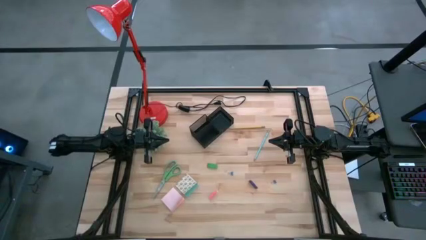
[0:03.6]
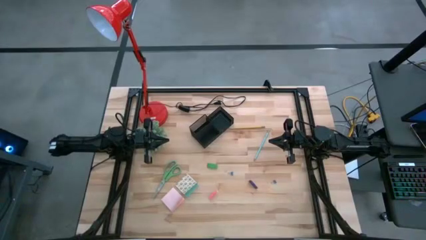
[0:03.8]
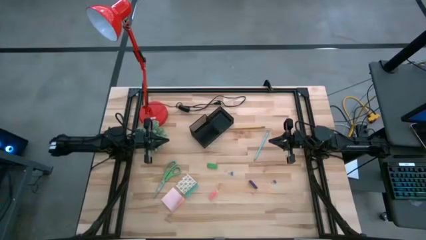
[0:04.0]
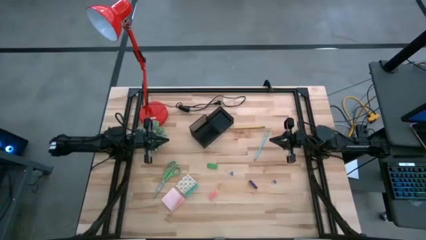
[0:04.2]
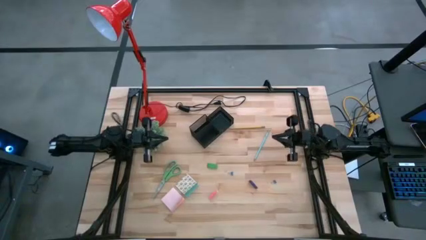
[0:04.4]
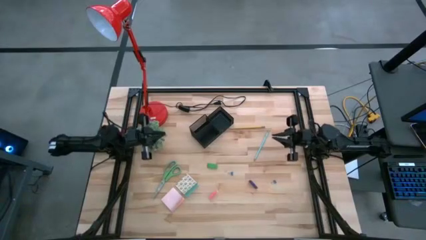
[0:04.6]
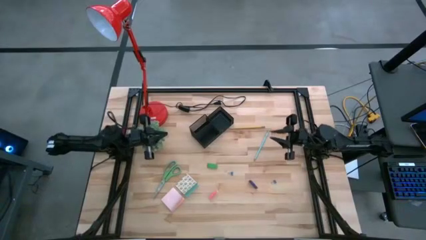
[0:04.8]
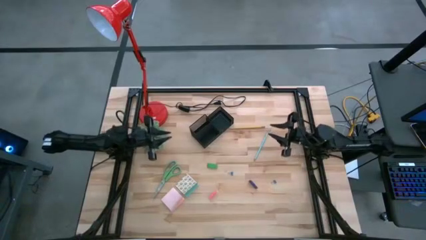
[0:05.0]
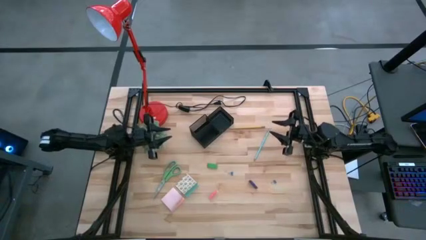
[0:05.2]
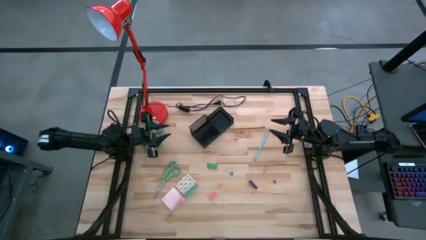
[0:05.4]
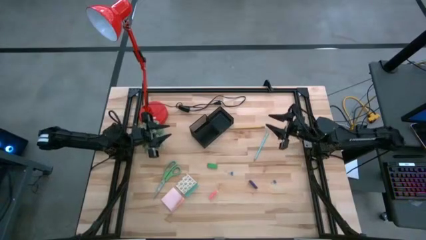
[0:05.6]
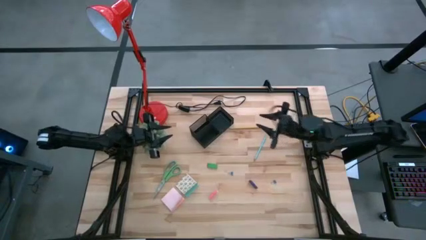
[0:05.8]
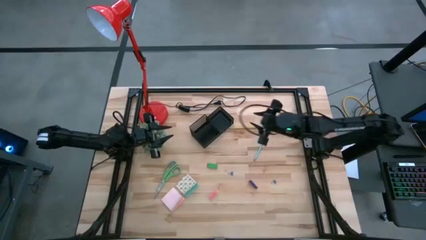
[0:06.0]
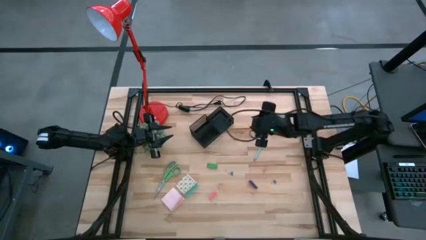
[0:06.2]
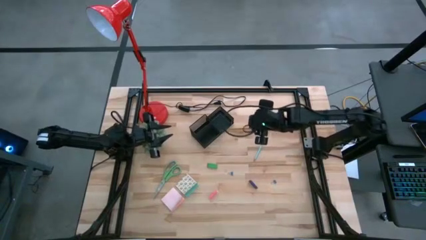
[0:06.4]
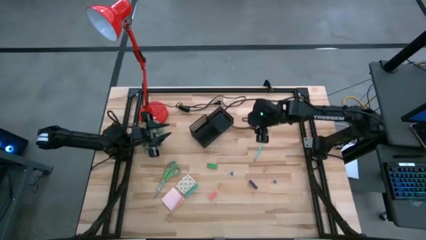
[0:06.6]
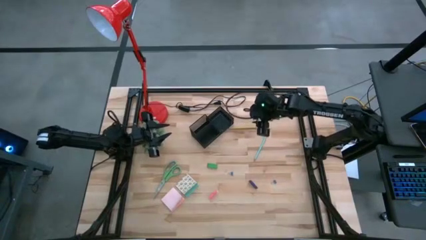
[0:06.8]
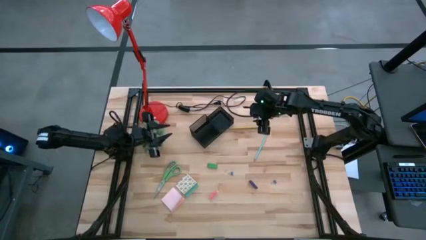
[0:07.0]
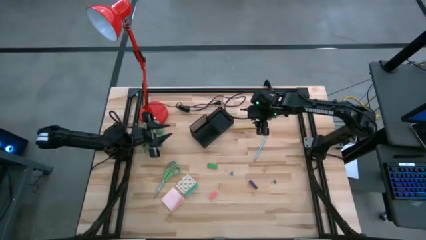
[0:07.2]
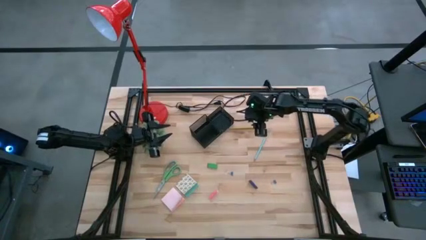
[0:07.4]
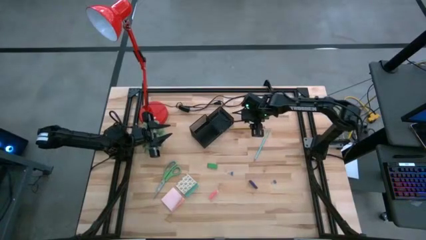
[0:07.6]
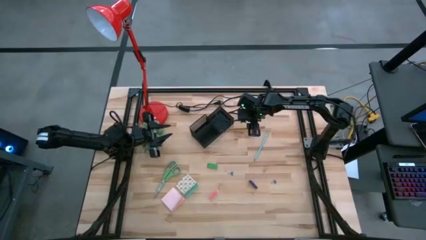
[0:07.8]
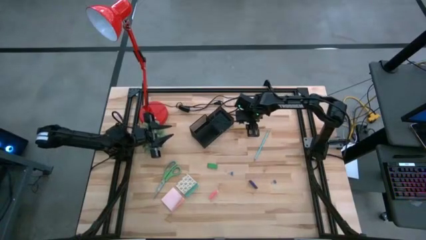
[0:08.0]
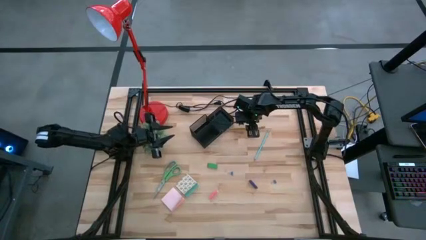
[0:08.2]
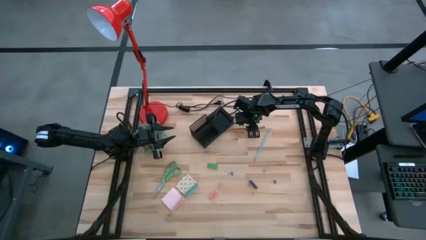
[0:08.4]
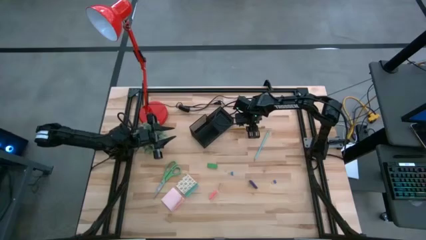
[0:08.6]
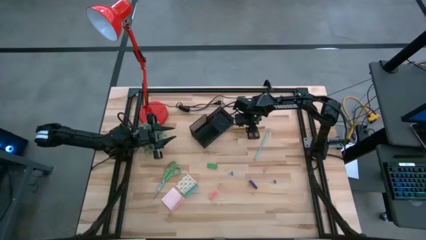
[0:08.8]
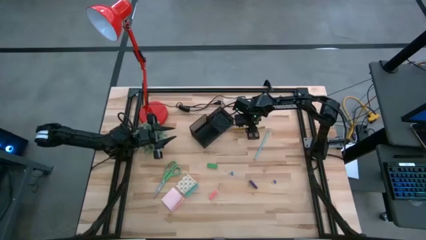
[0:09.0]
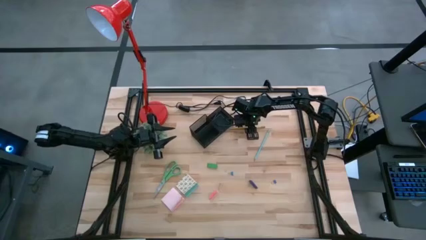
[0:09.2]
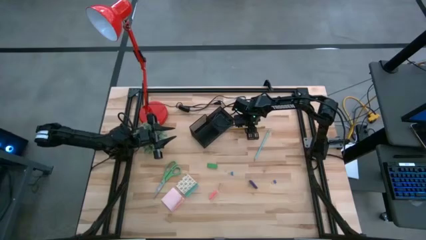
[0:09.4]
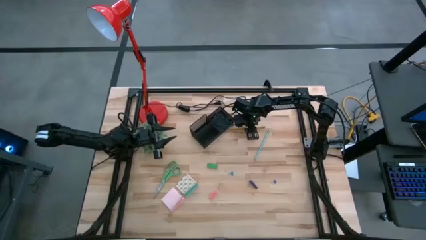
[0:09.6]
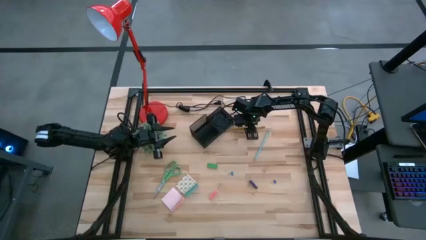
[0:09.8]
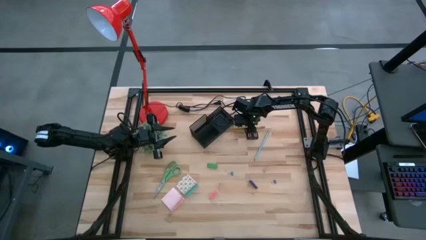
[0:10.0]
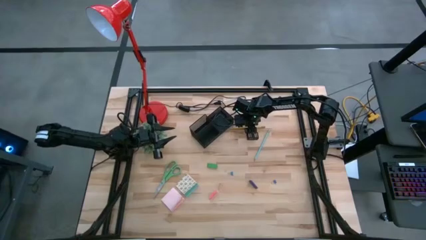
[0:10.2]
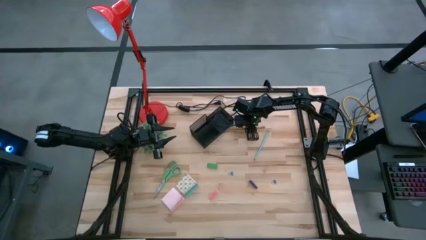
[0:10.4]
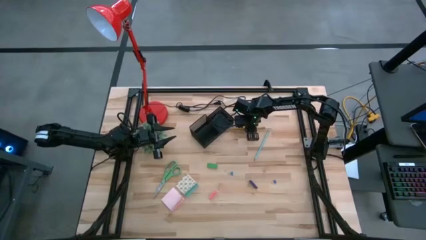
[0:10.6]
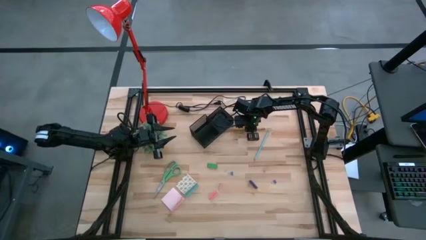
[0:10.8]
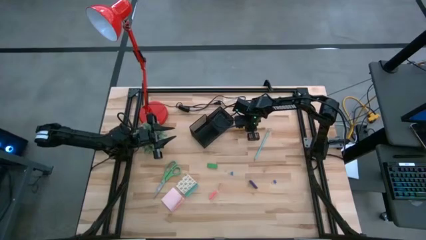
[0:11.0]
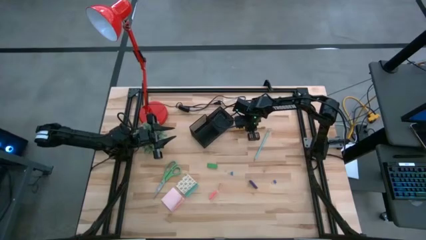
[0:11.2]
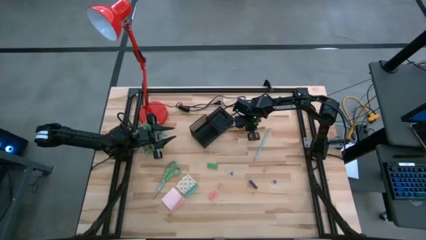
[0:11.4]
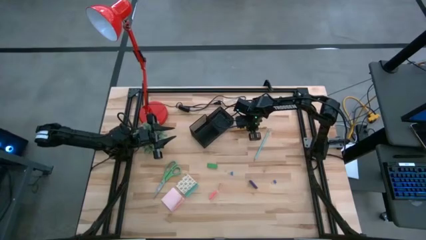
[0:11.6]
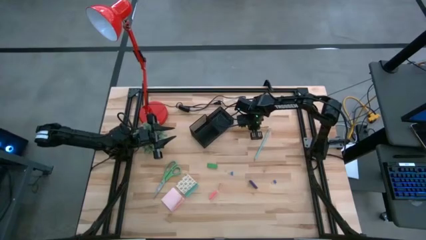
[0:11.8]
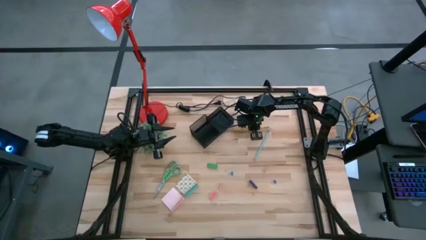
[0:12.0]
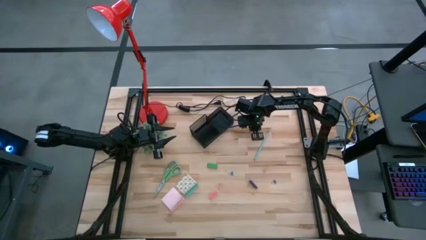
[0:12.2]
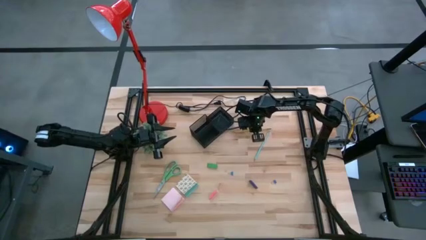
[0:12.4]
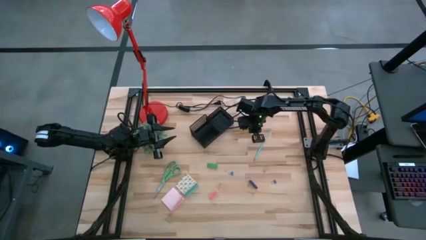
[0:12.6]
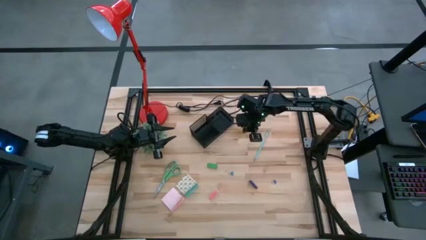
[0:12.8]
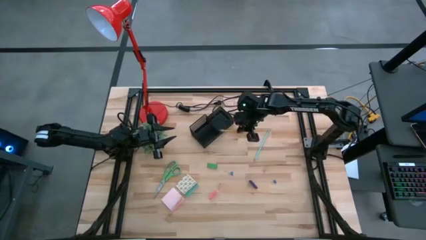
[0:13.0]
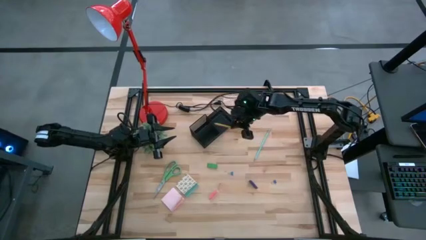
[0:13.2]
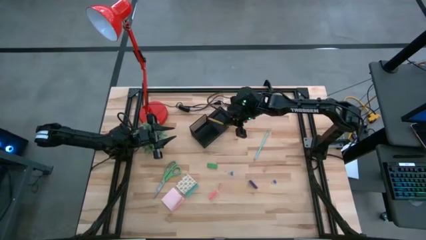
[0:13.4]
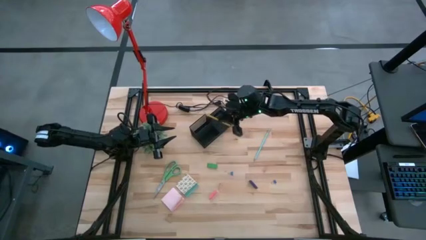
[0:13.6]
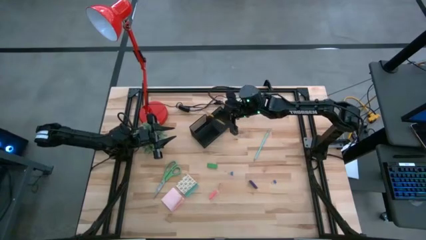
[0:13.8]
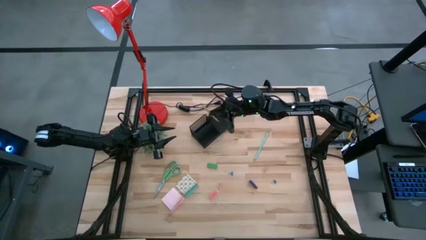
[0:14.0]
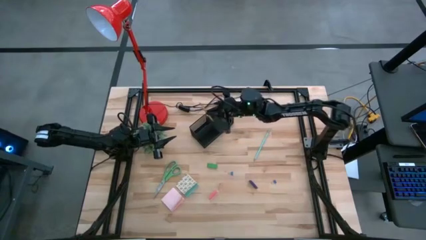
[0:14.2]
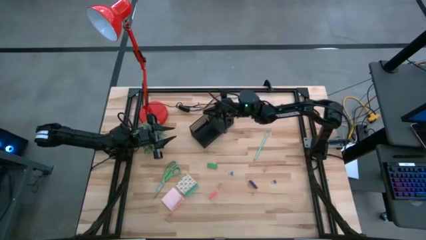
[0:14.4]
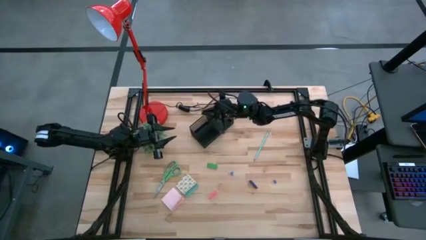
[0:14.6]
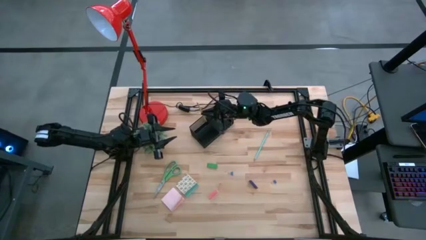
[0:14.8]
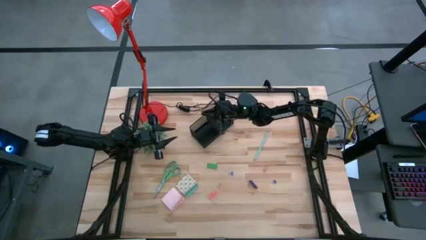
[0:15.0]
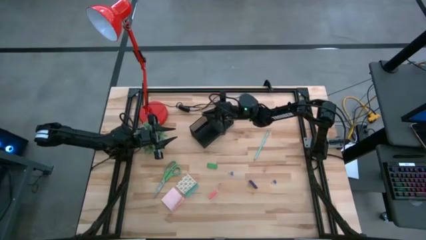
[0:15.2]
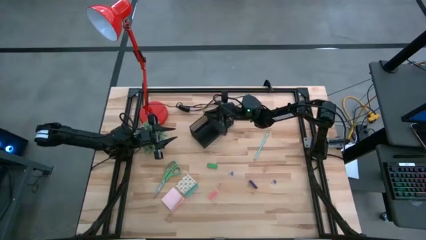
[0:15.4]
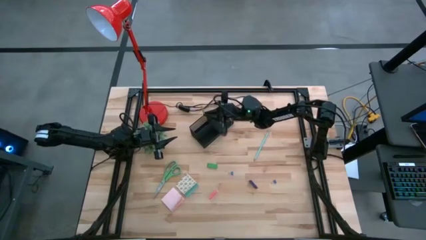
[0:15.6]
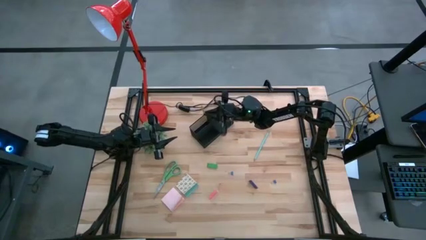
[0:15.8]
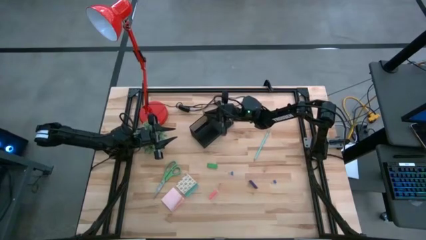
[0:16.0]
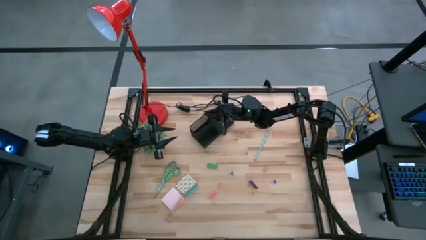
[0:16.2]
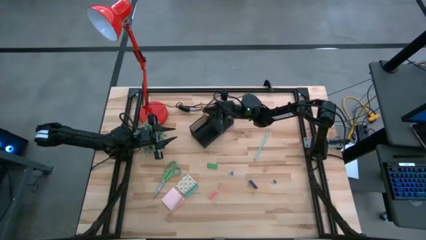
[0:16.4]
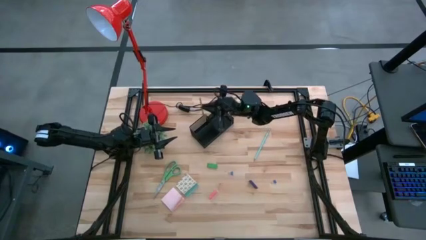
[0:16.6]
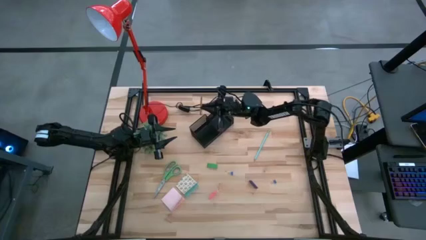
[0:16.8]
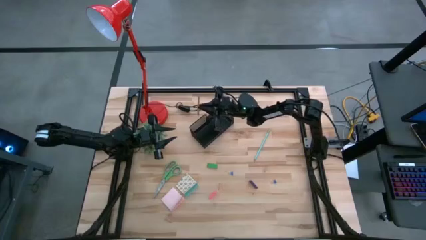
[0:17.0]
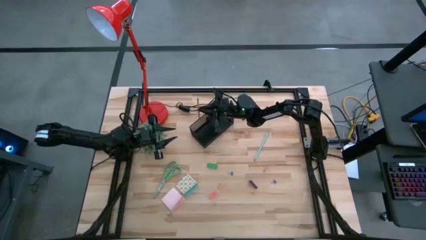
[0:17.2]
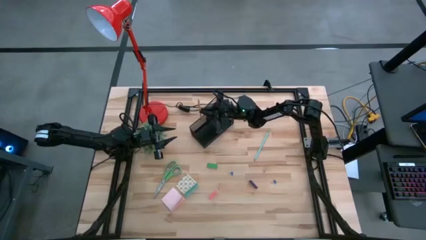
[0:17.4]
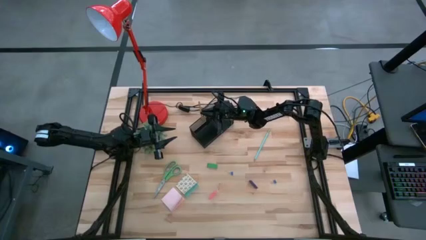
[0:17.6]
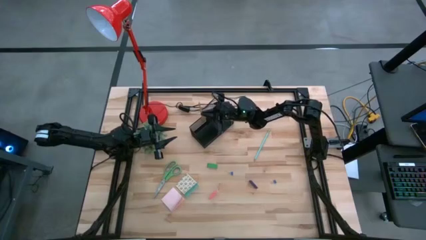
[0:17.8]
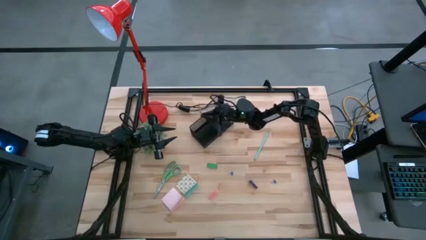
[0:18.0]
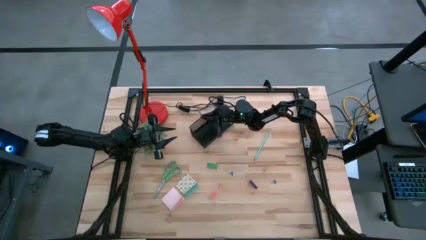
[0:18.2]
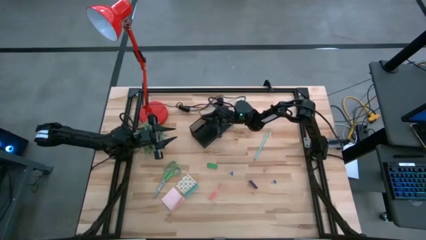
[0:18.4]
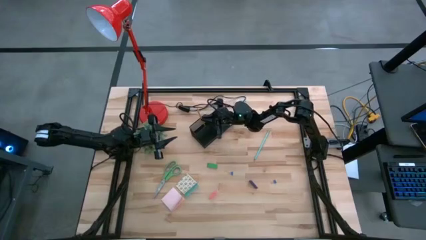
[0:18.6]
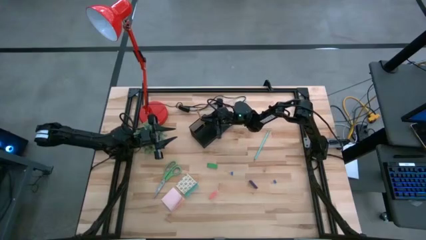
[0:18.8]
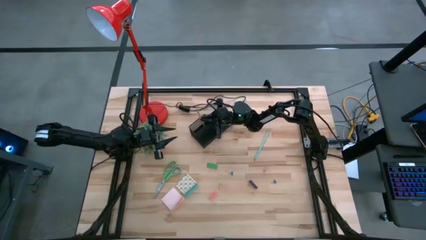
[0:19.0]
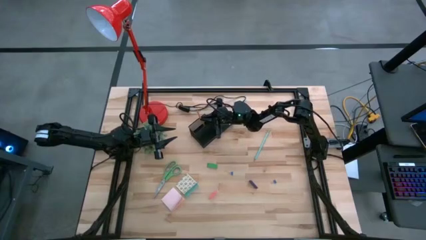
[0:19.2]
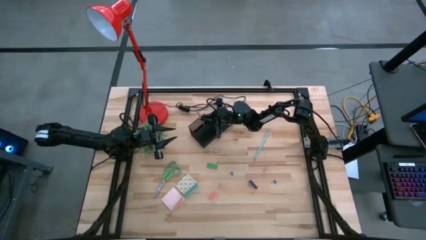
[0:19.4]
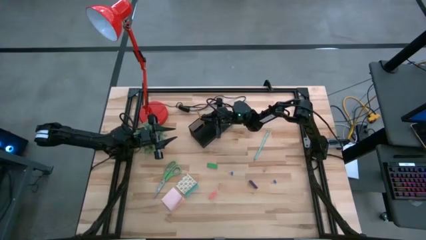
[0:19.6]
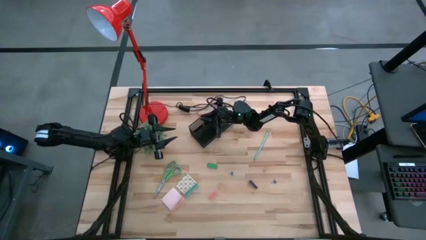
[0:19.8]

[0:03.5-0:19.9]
Task: Pick and place office supplies into organizer
Put the yellow pencil into the black desk organizer
